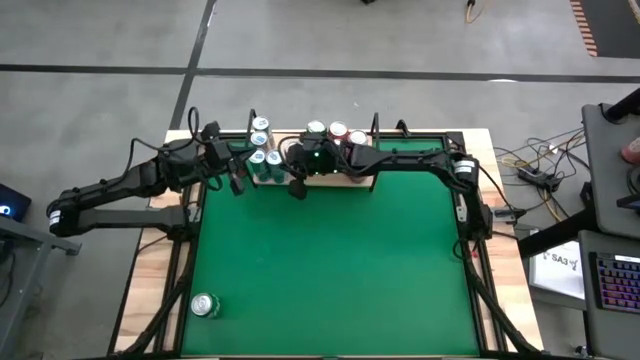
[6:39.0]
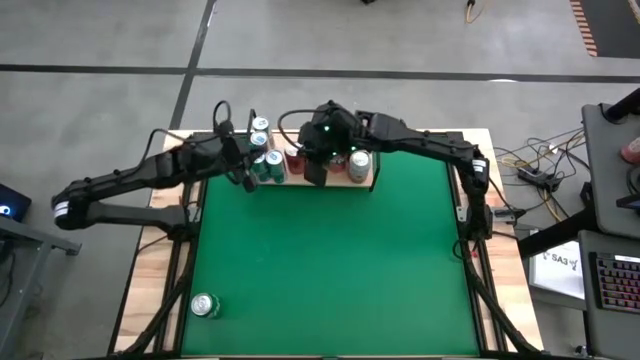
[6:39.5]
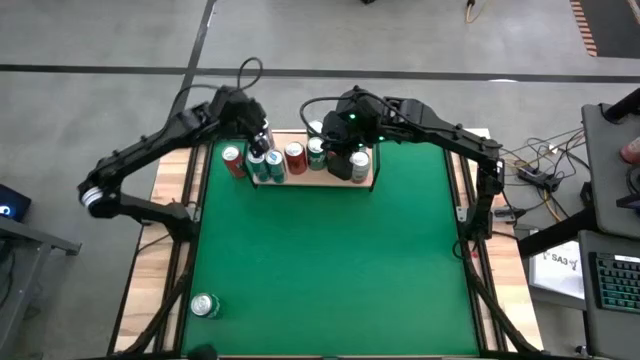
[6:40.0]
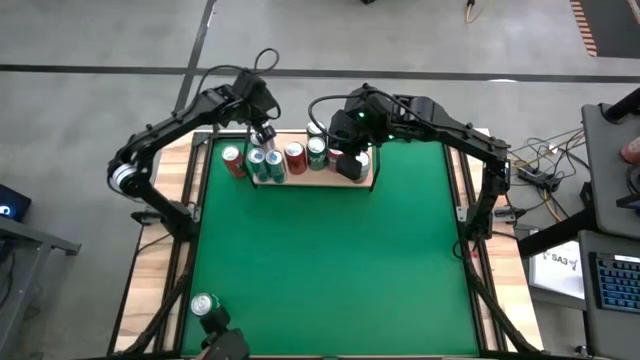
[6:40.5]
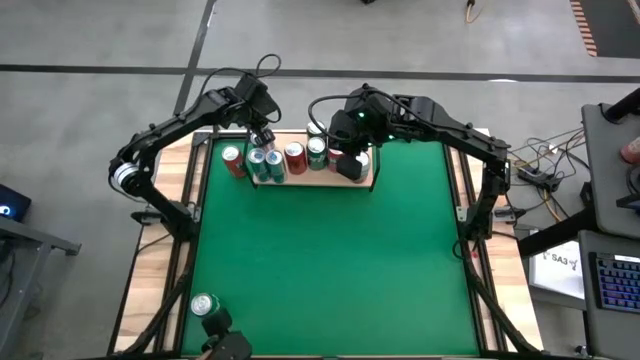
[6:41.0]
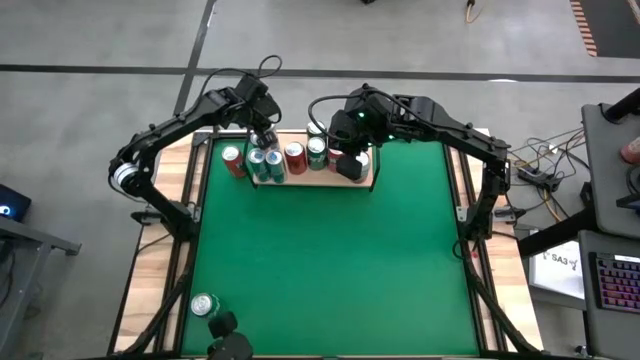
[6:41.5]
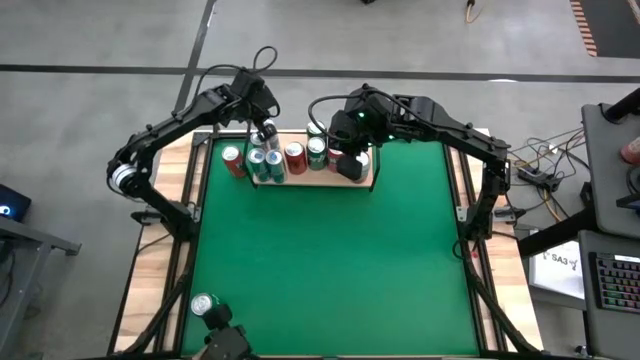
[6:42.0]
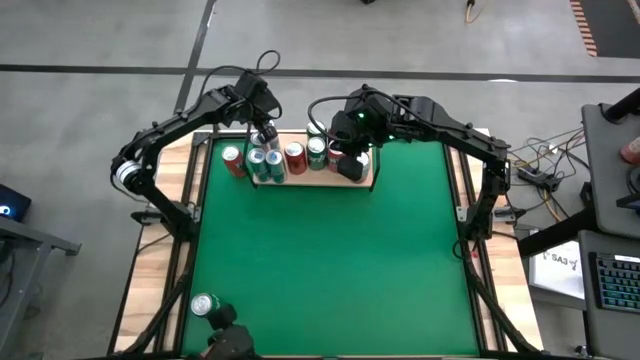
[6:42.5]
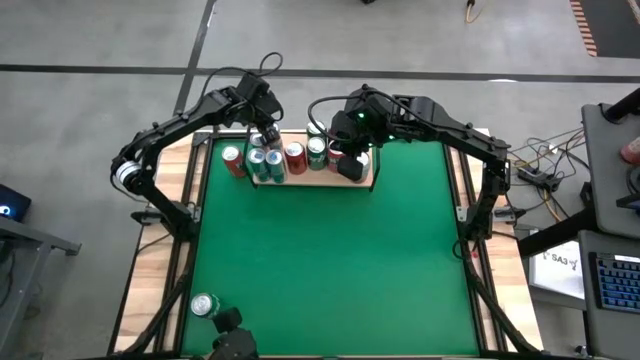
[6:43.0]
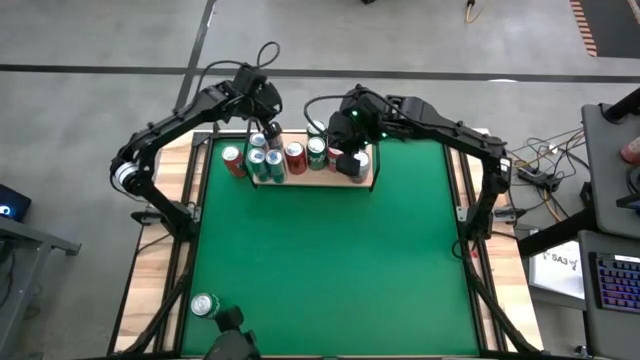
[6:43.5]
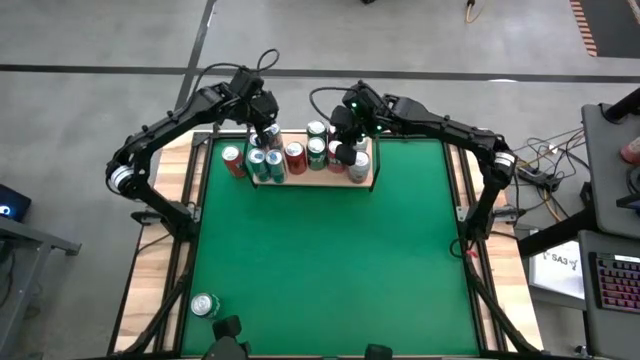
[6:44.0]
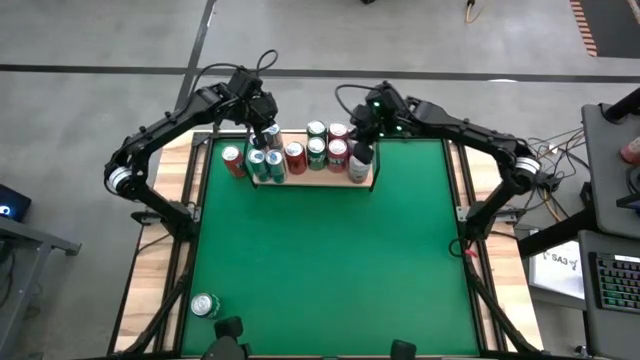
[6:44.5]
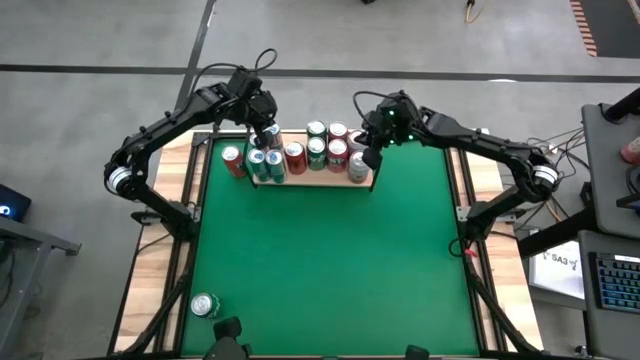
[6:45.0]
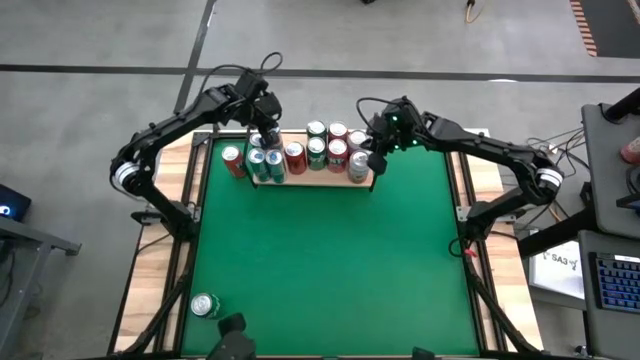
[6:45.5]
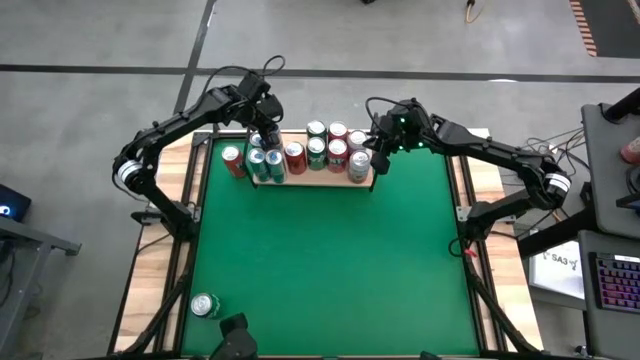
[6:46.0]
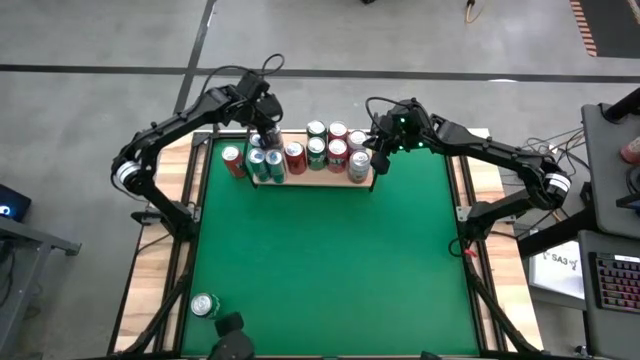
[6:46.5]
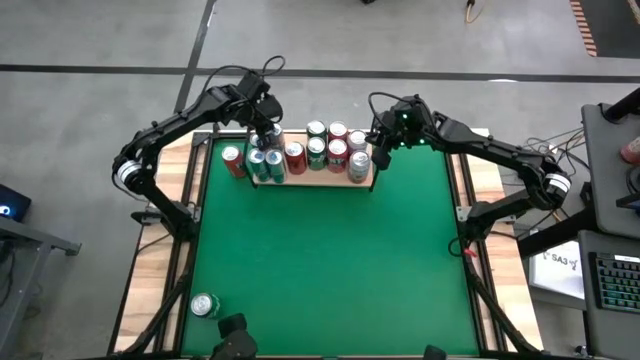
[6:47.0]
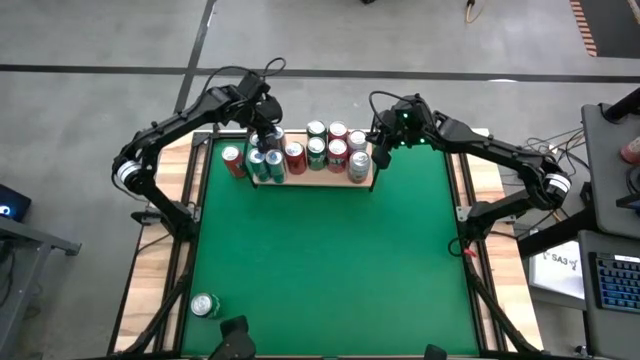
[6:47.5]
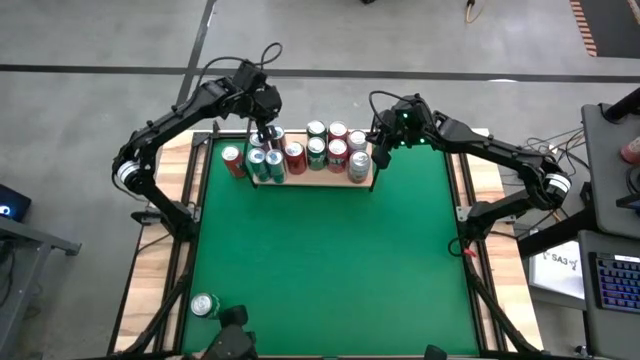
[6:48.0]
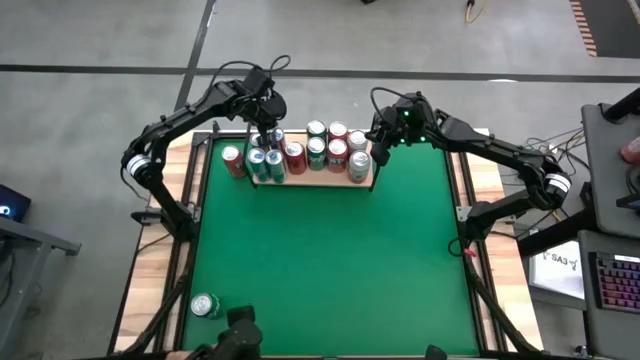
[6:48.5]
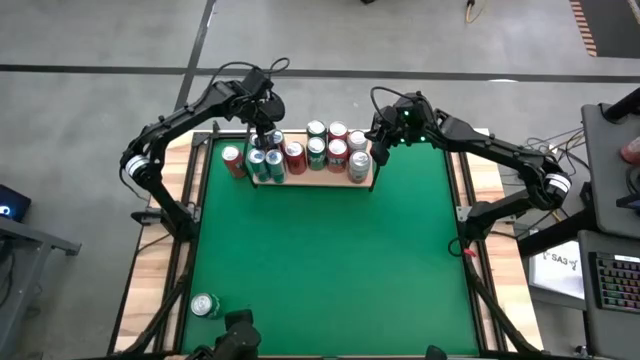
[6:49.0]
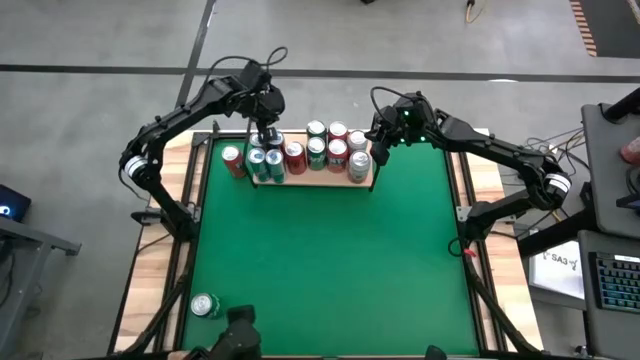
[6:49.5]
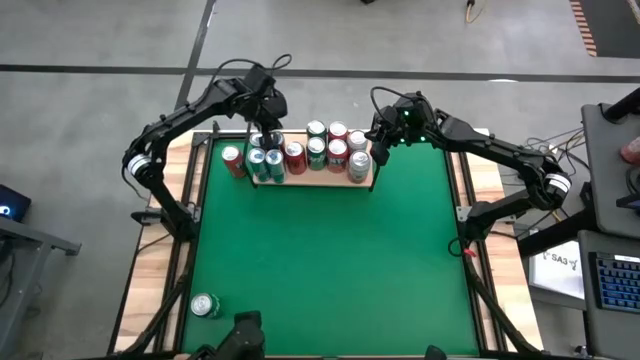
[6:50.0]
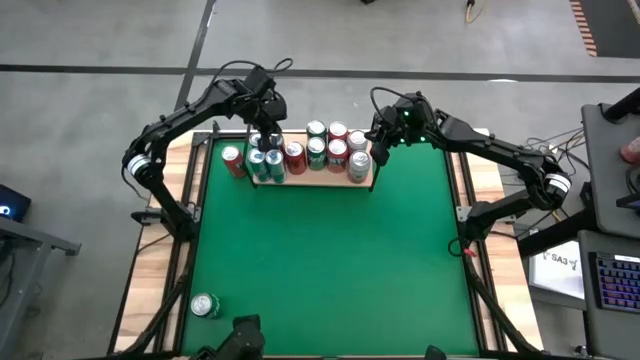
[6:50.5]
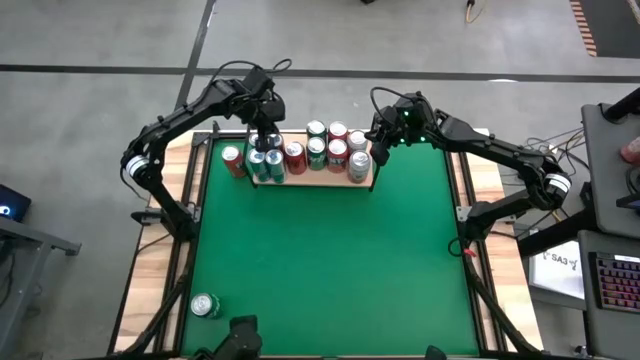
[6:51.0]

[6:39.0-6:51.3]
Task: Pick and place cans onto a shelf
Adjust the blue silver soda can on the shelf

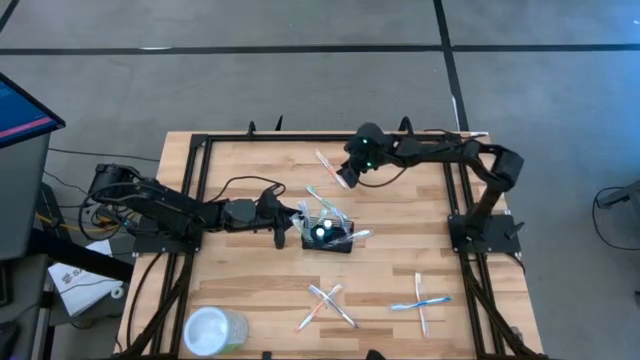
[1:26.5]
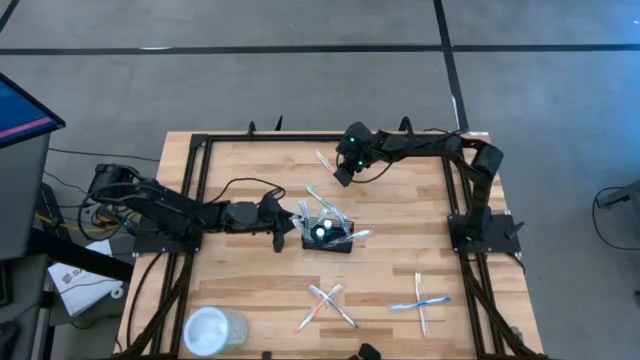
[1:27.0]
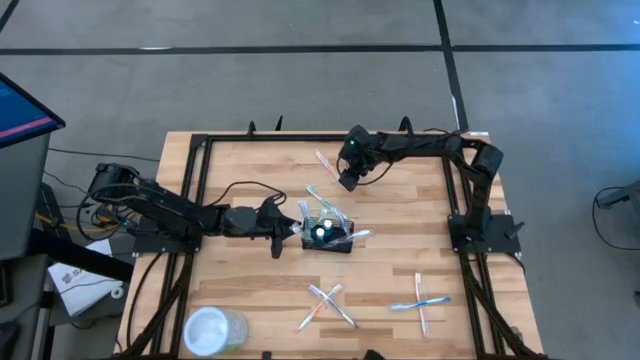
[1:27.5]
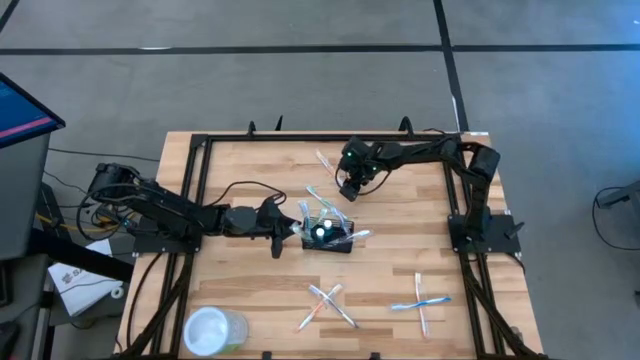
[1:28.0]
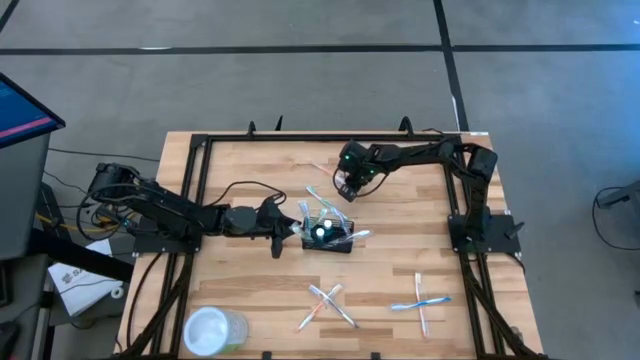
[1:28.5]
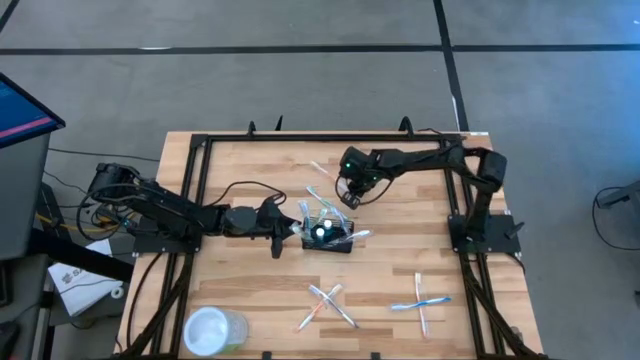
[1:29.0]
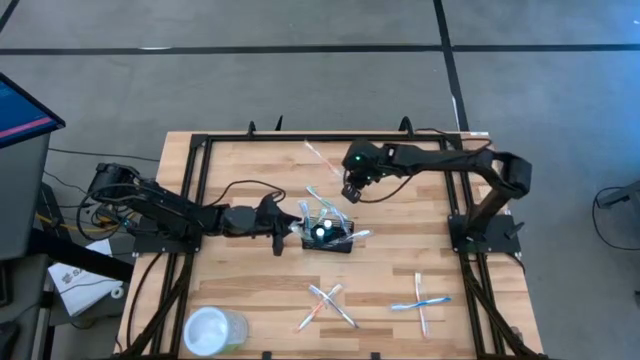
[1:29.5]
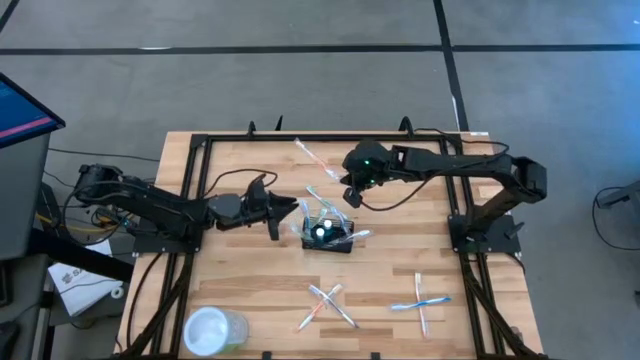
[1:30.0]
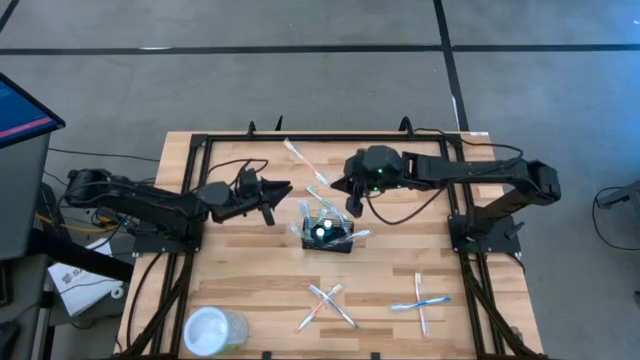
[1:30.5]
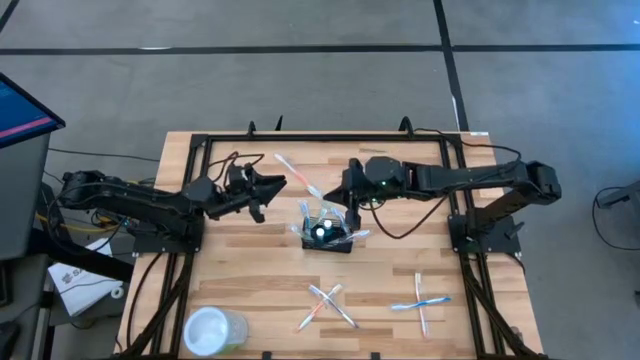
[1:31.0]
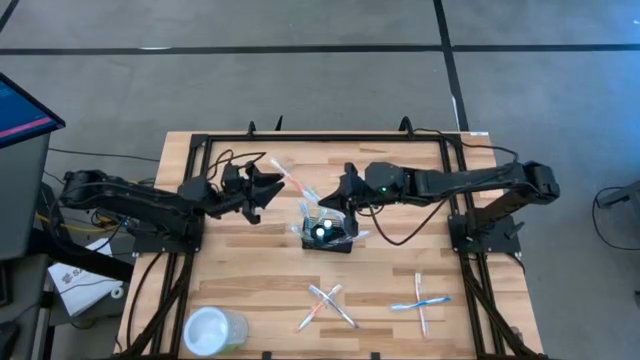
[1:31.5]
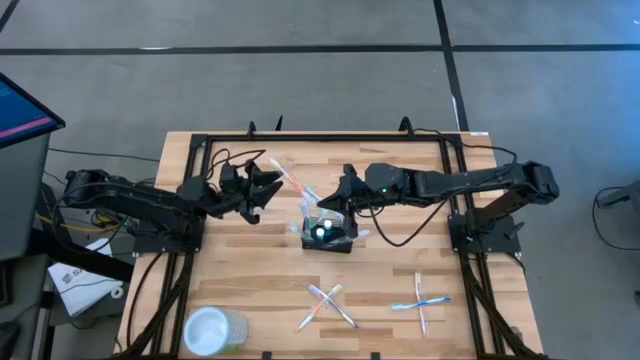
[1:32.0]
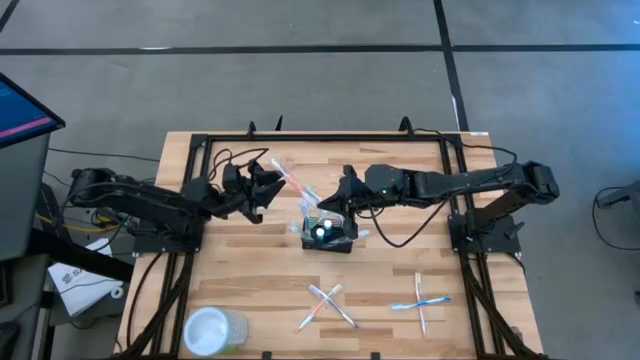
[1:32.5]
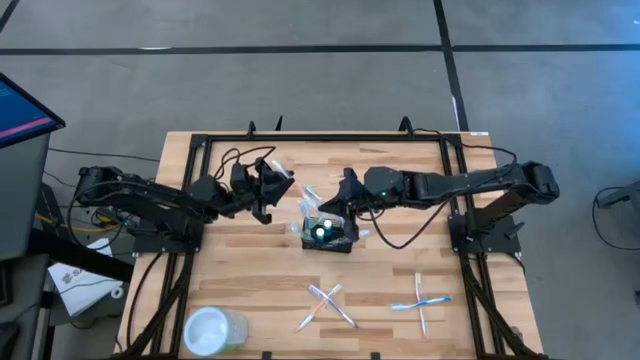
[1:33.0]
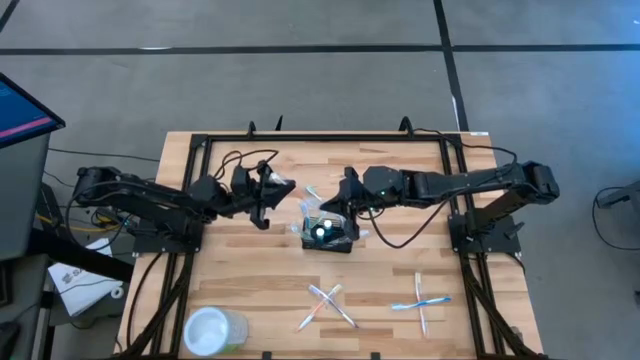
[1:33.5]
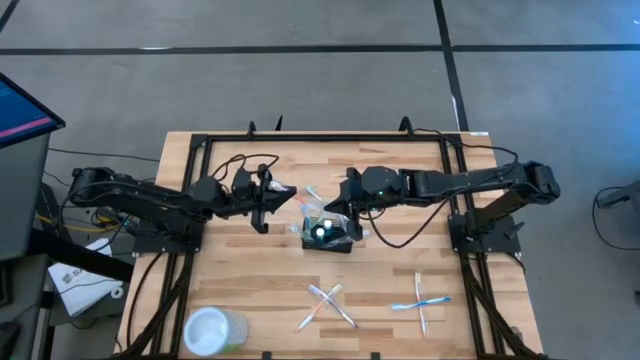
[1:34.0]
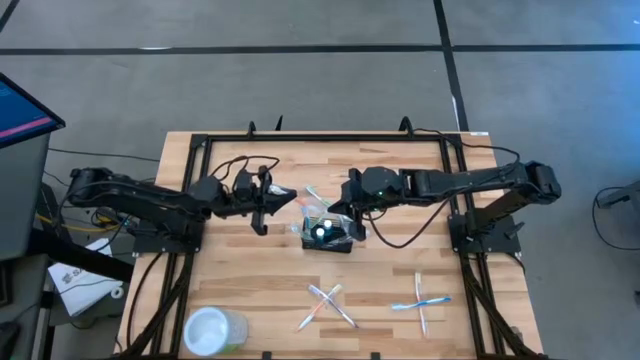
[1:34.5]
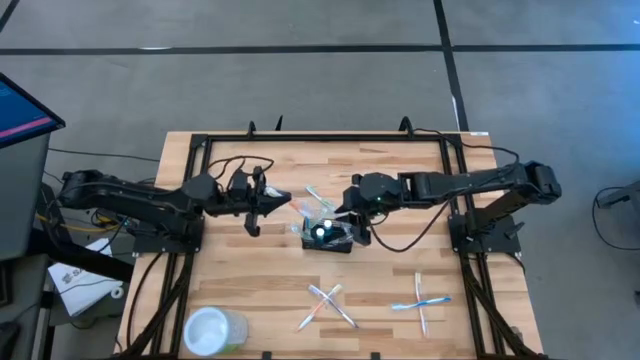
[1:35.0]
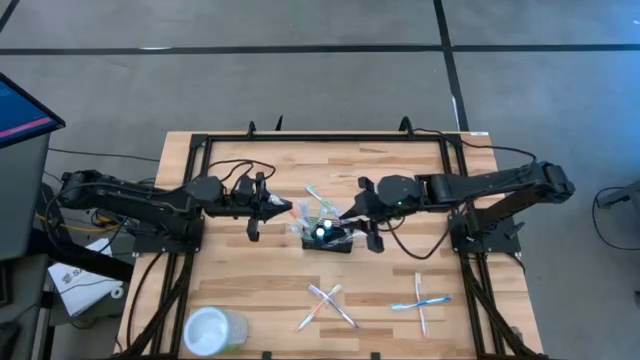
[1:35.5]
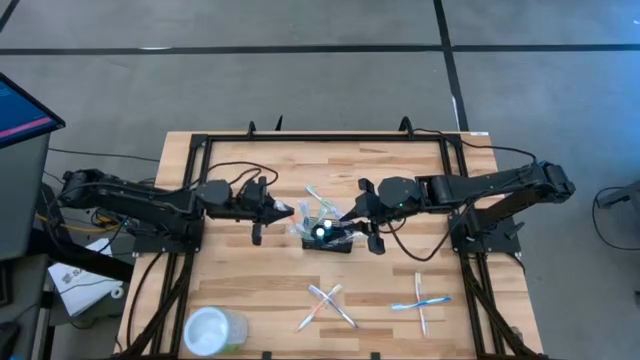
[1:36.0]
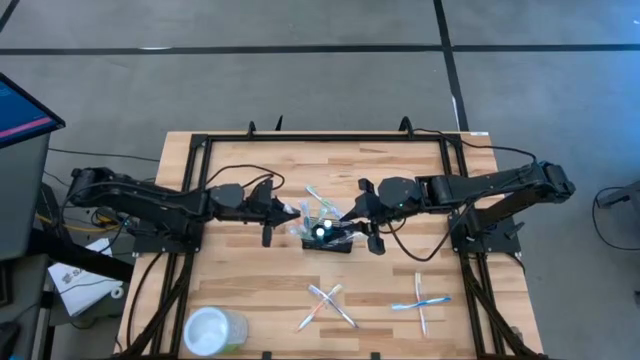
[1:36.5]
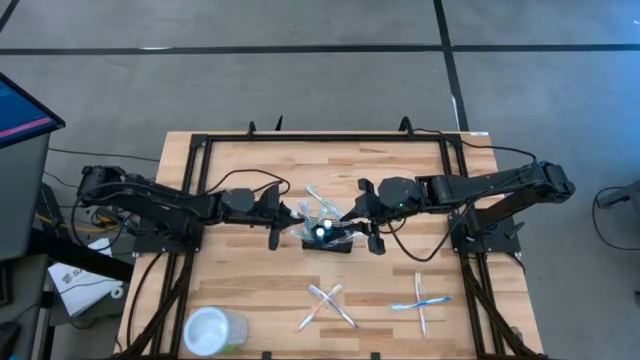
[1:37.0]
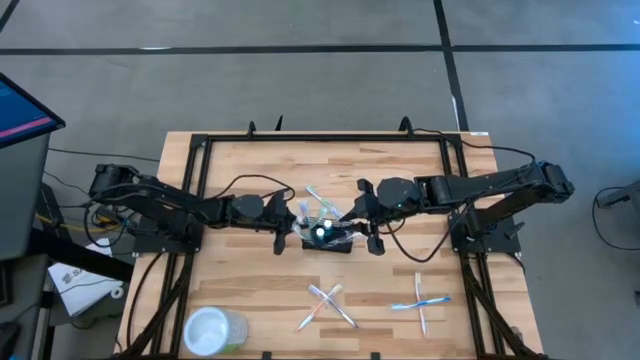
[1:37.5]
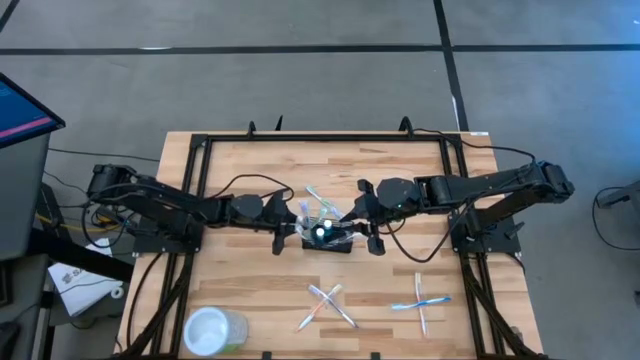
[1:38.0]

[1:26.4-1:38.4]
Task: Pick & Place toothbrushing station
Put the top orange toothbrush into the wire organizer
